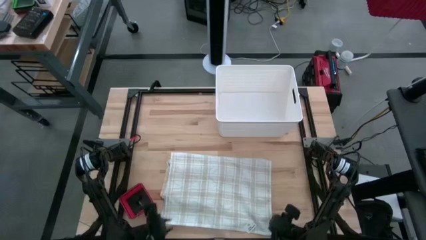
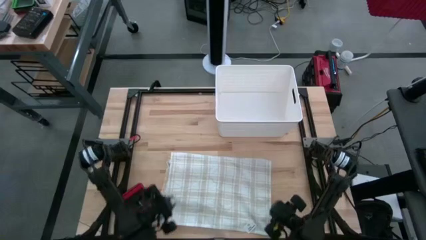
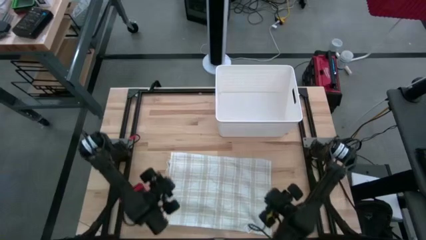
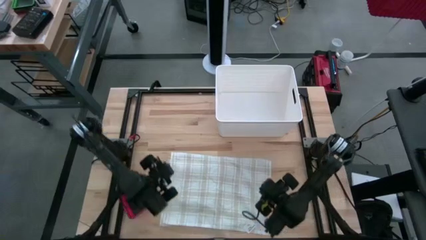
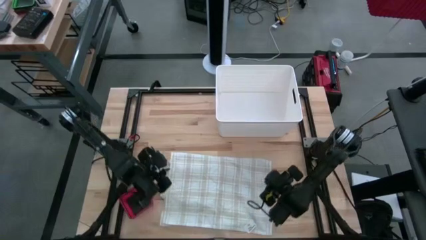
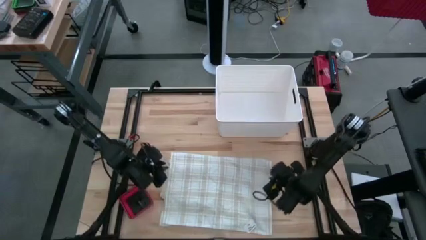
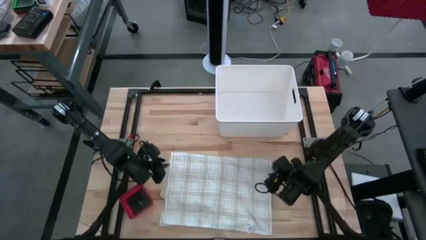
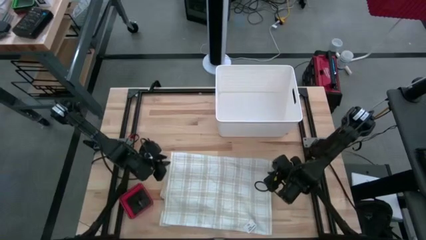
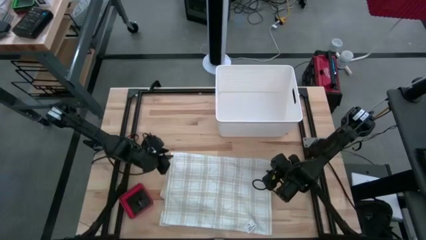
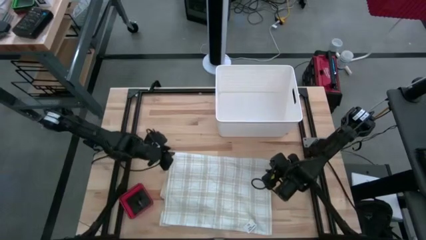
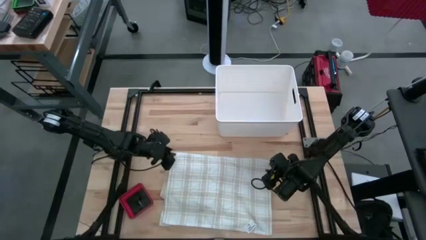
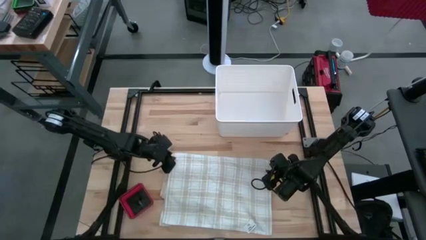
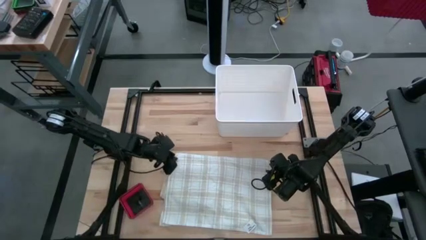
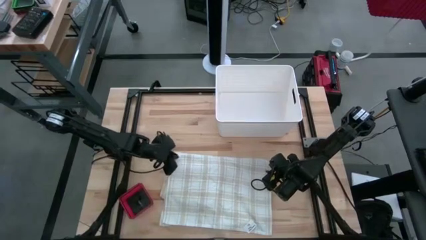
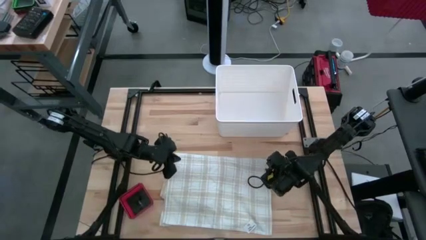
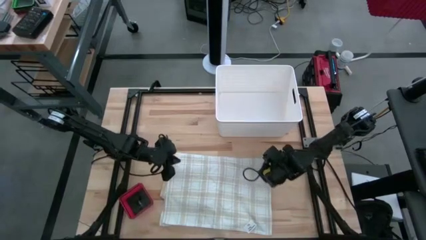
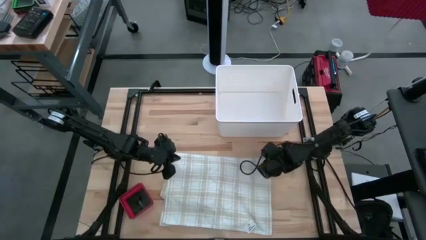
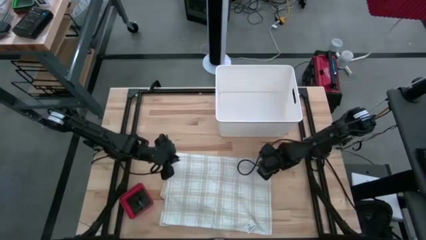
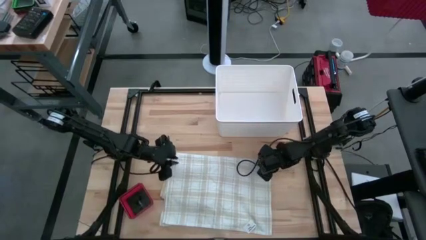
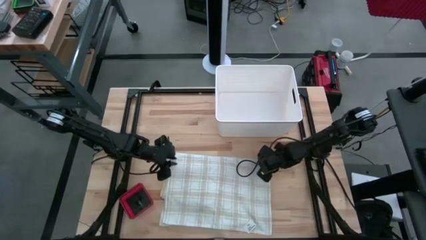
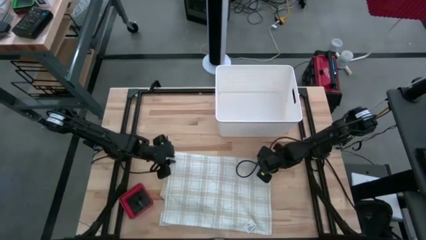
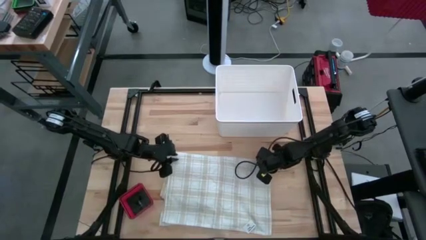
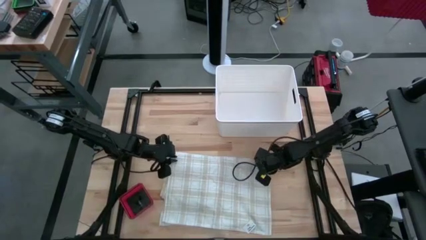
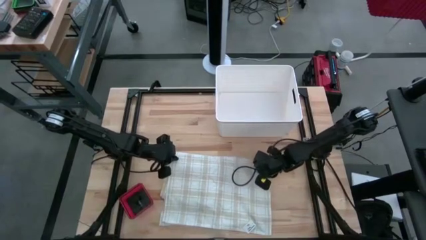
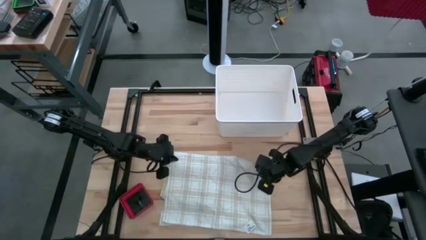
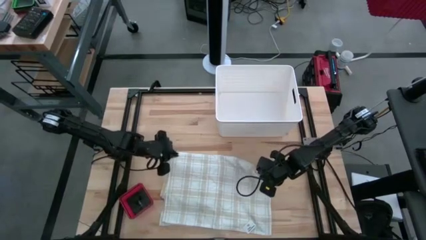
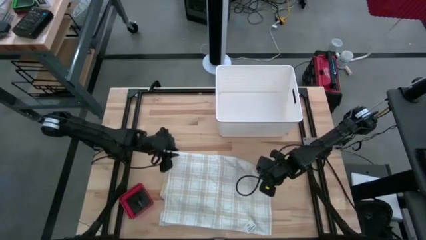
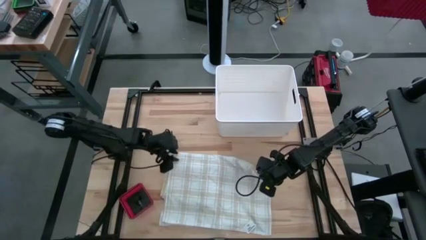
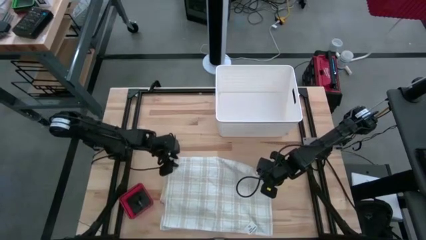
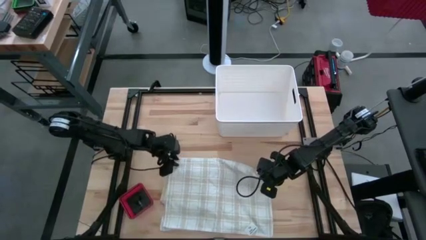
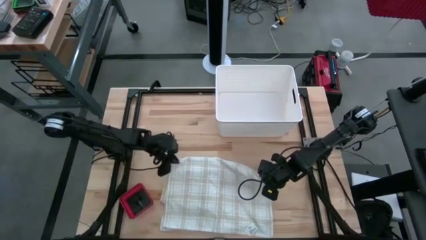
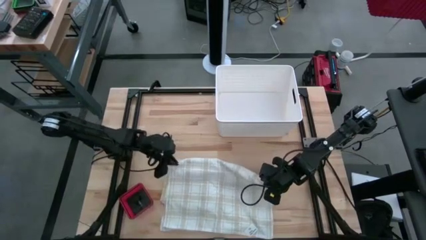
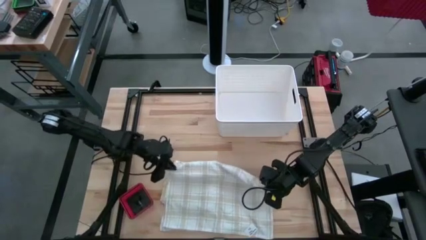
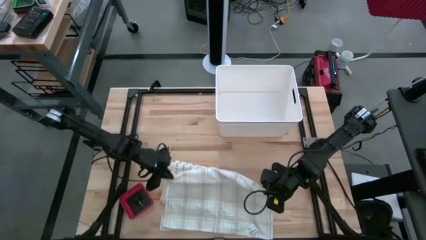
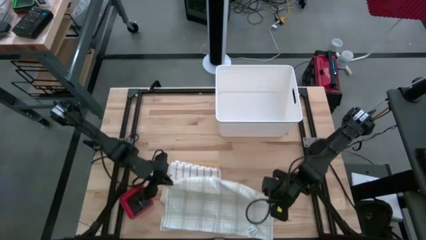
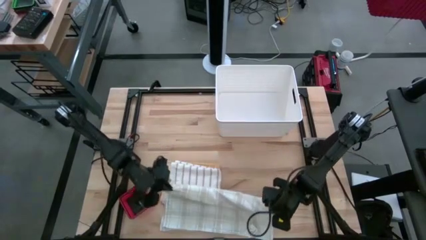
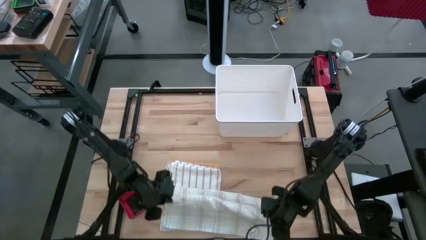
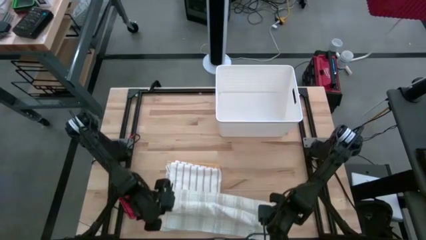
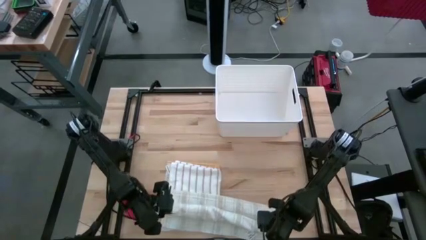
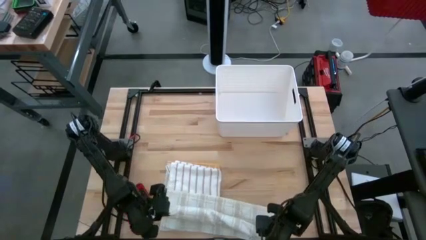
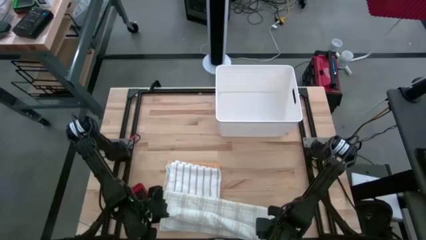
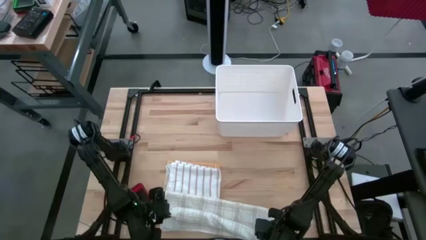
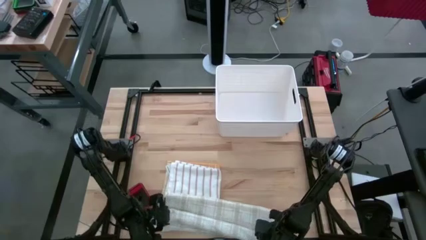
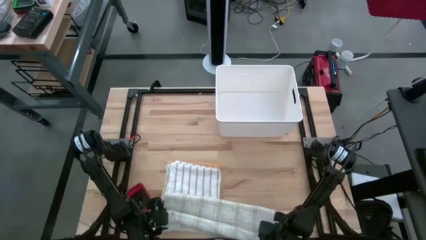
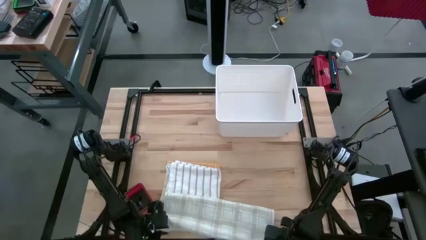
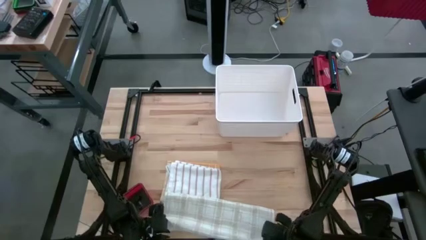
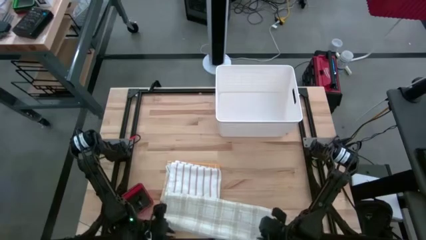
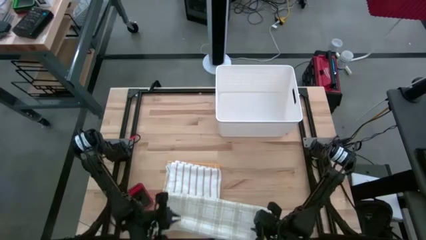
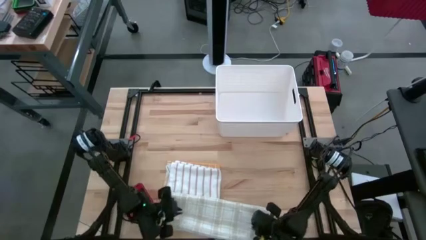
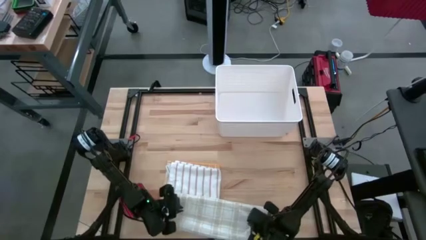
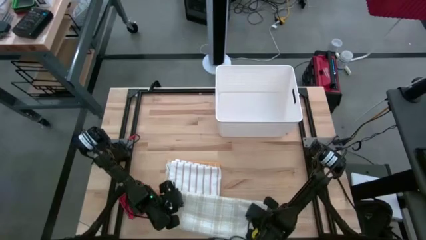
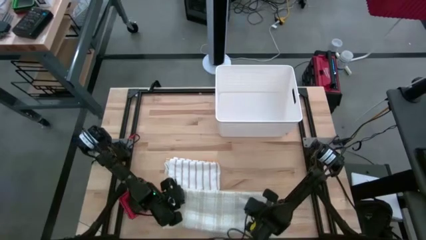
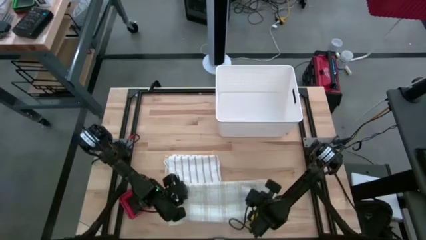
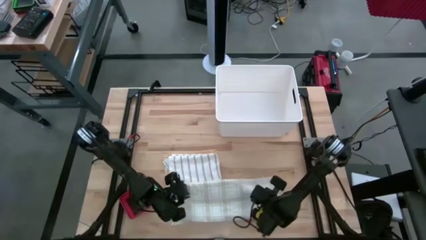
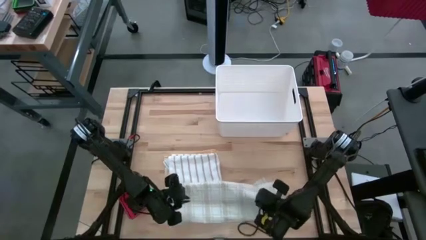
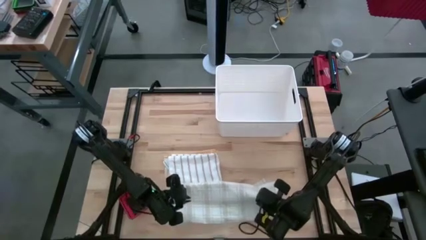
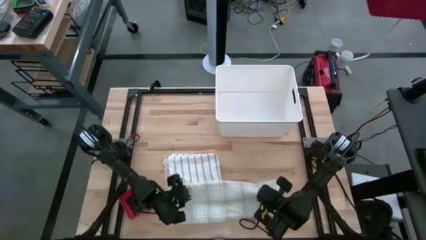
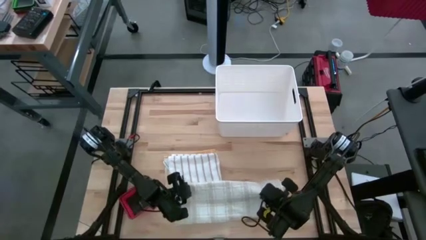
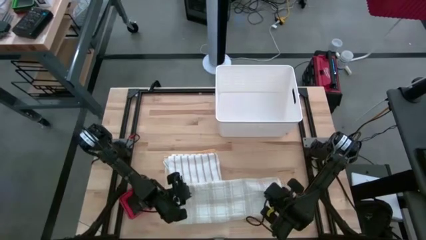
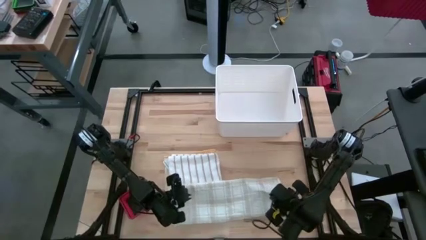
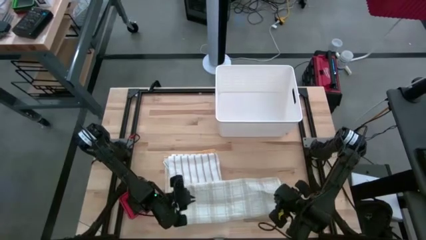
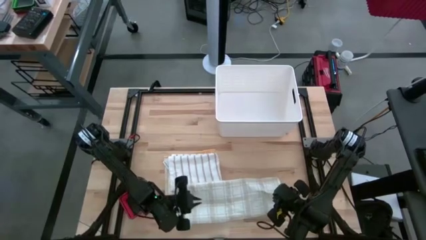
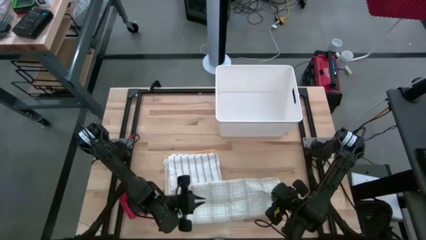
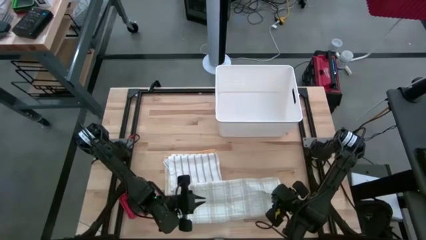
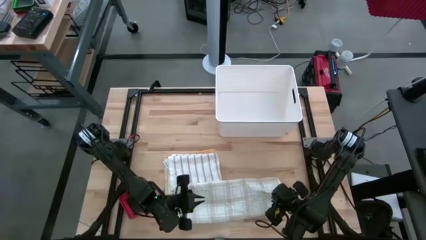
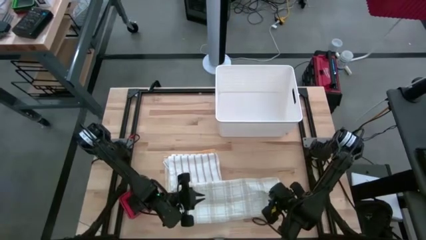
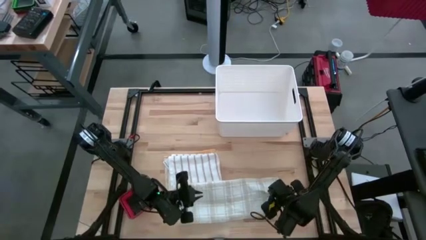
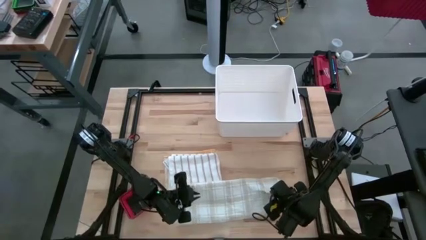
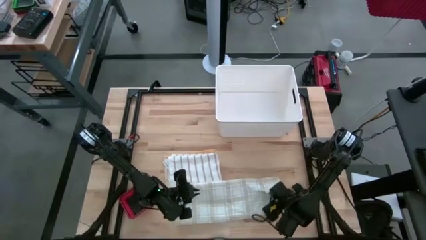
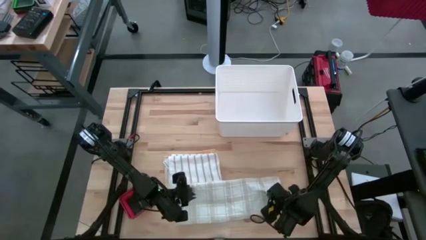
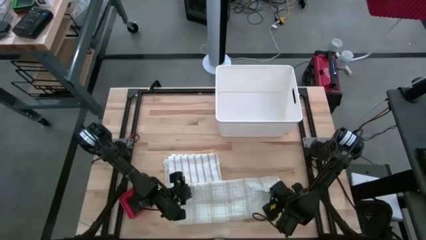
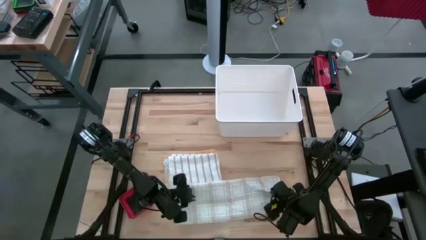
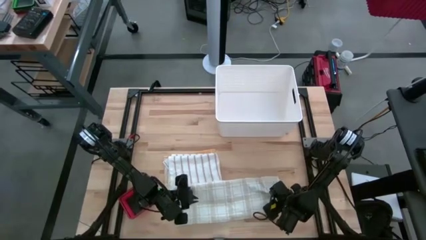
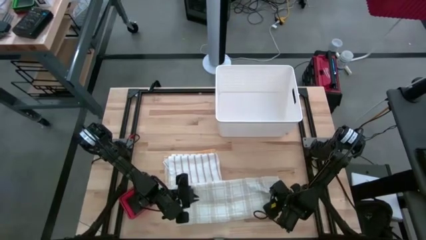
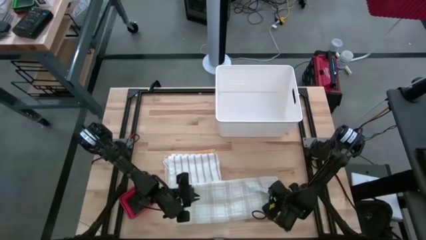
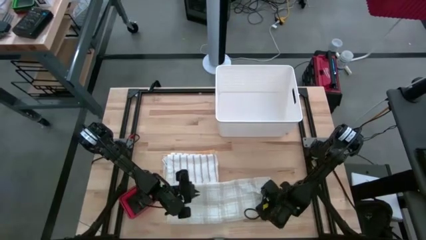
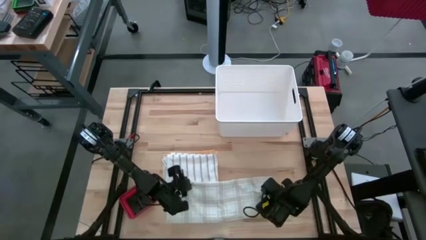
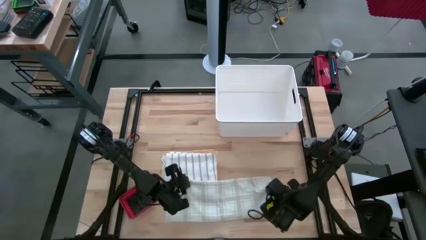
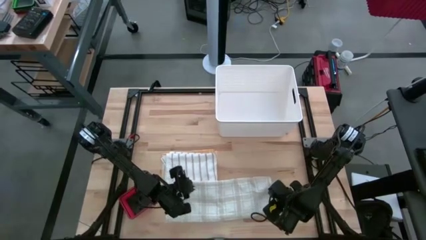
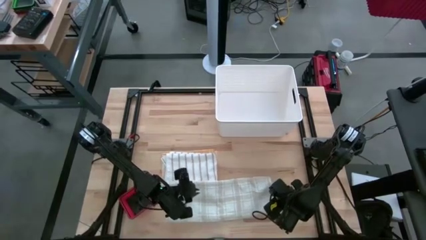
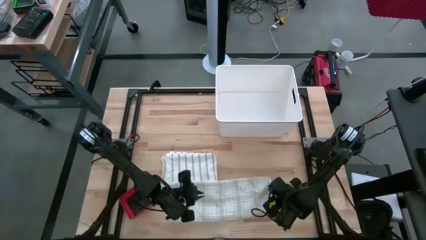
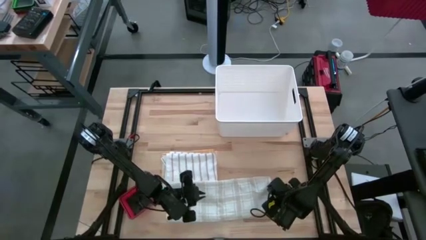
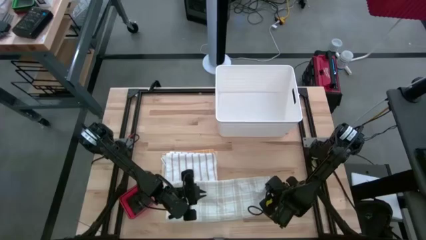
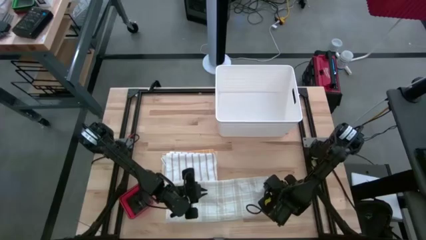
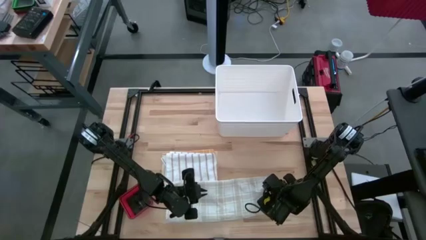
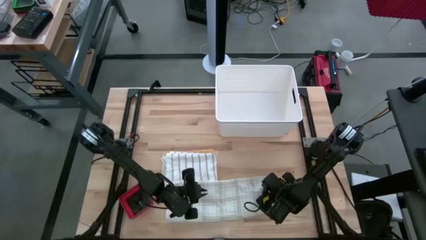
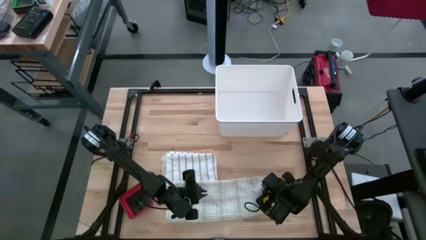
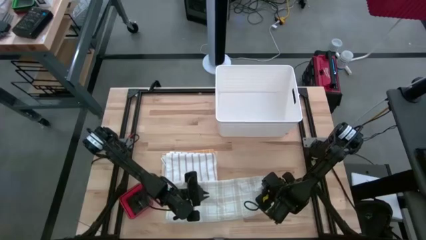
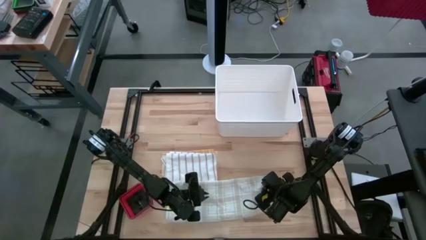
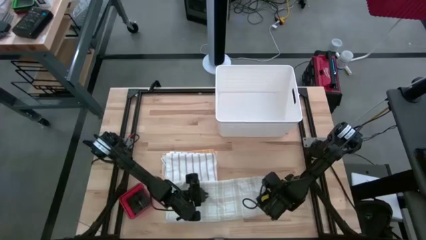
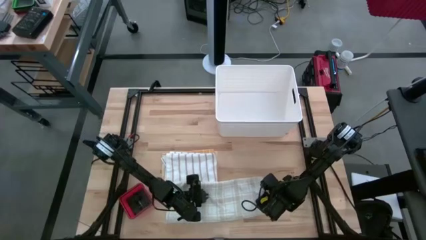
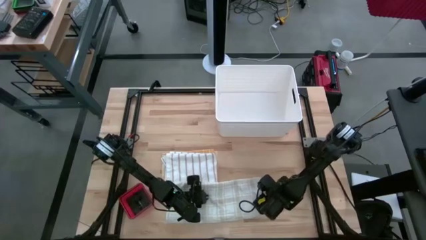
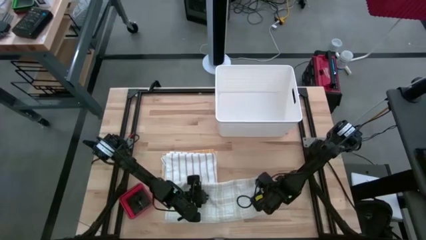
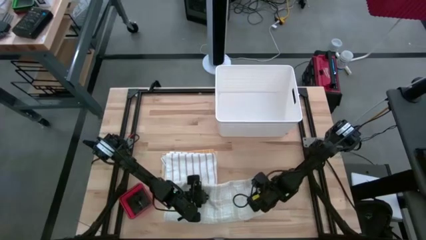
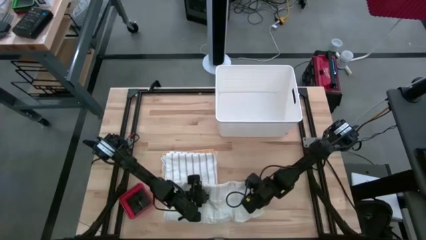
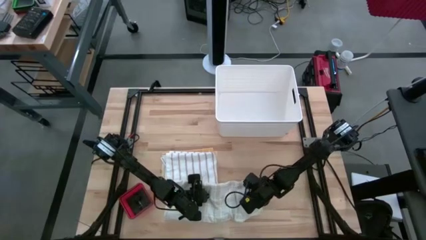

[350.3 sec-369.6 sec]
Task: Fold towel
Fold the light gray patterned towel
